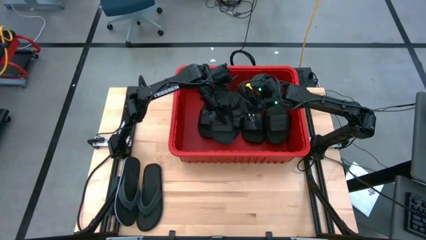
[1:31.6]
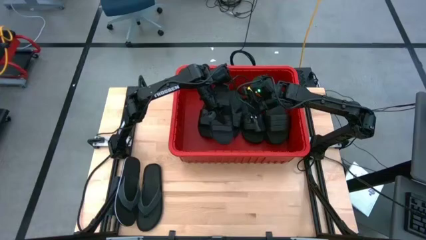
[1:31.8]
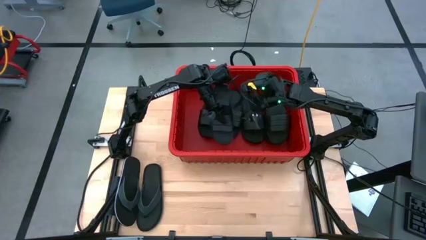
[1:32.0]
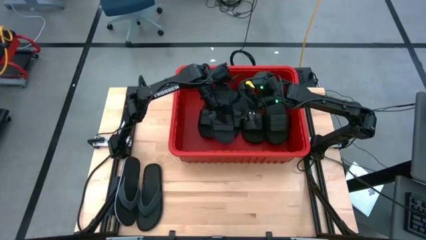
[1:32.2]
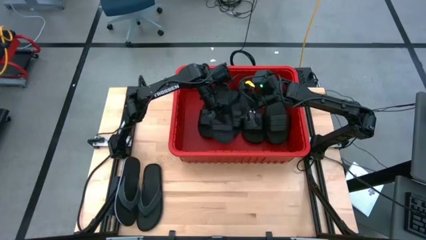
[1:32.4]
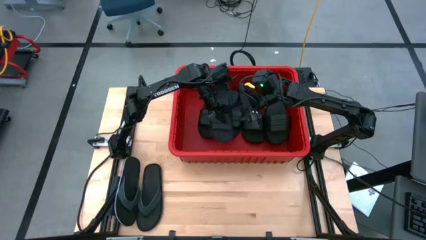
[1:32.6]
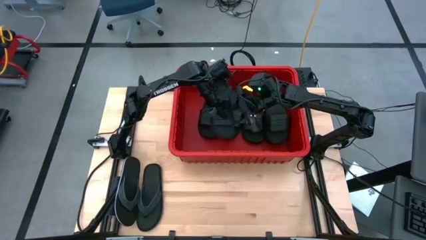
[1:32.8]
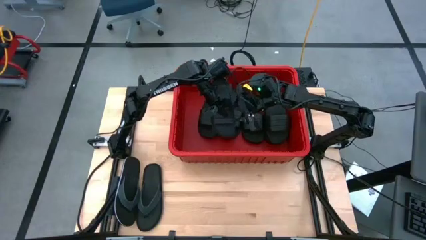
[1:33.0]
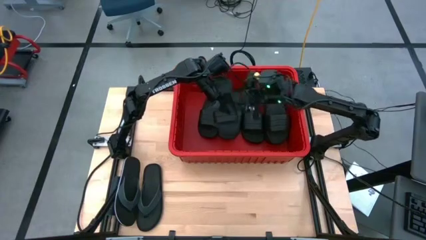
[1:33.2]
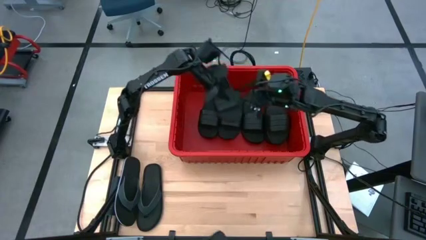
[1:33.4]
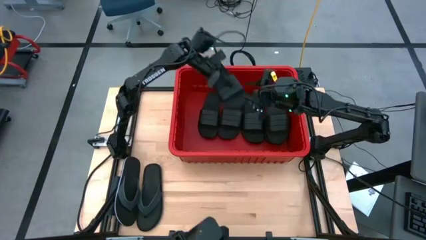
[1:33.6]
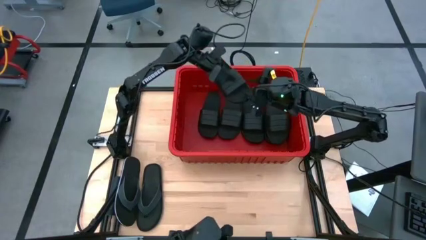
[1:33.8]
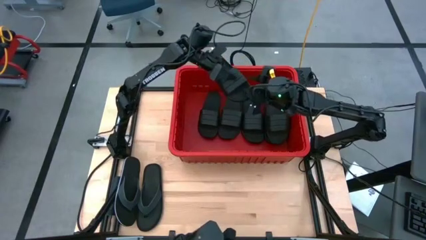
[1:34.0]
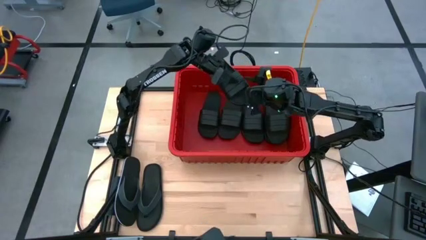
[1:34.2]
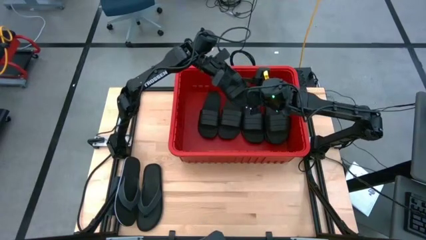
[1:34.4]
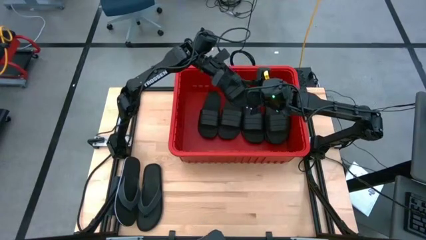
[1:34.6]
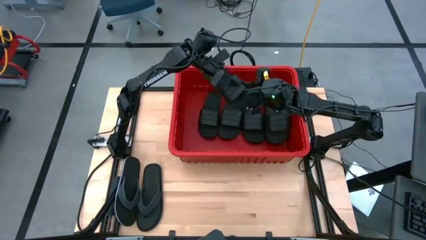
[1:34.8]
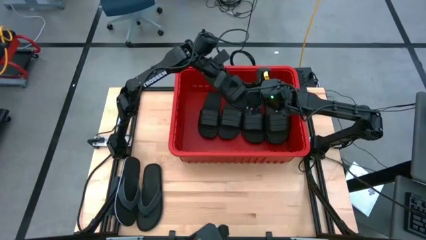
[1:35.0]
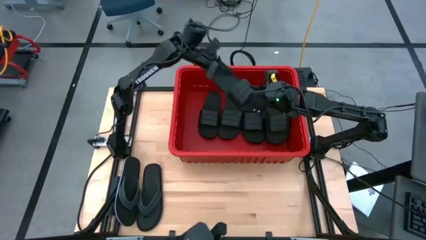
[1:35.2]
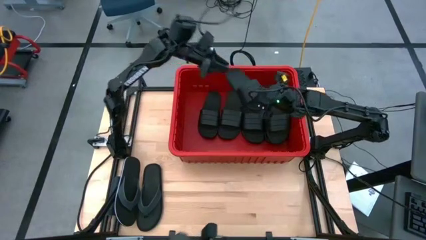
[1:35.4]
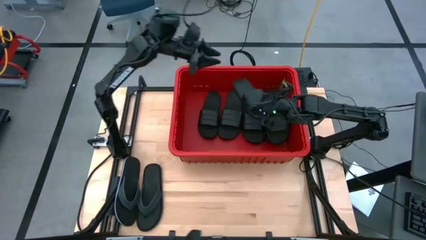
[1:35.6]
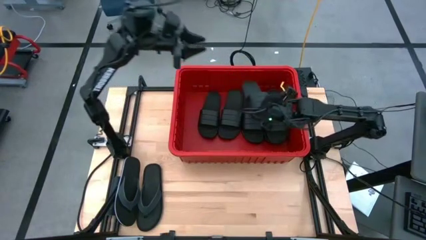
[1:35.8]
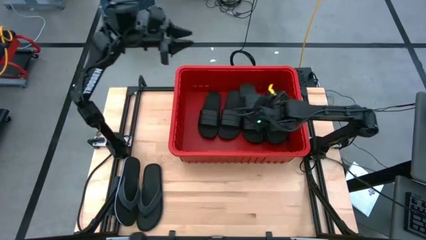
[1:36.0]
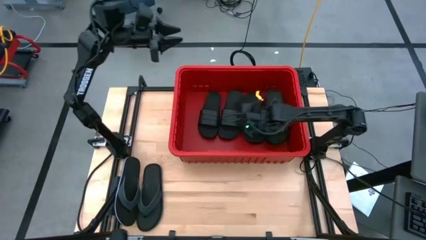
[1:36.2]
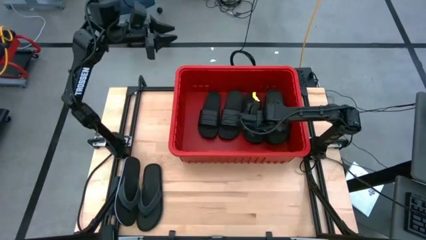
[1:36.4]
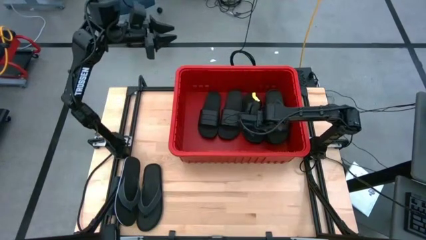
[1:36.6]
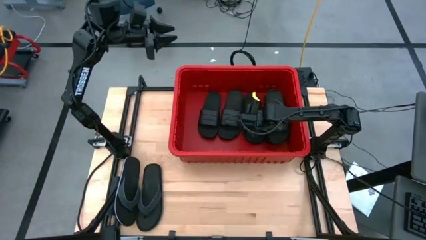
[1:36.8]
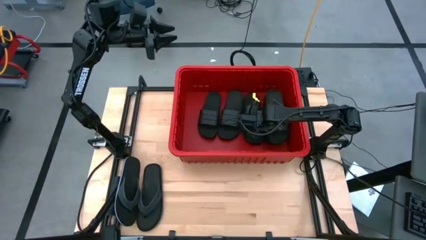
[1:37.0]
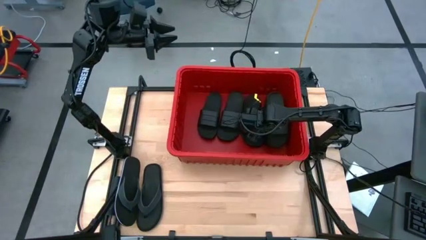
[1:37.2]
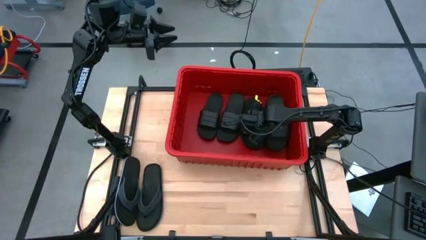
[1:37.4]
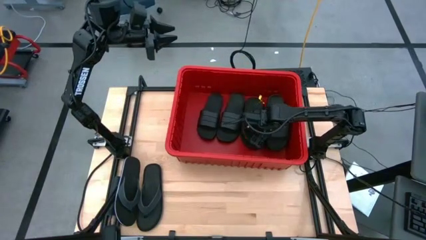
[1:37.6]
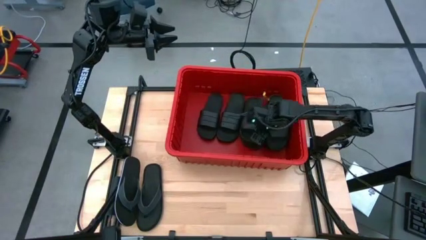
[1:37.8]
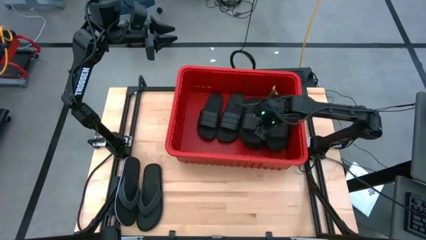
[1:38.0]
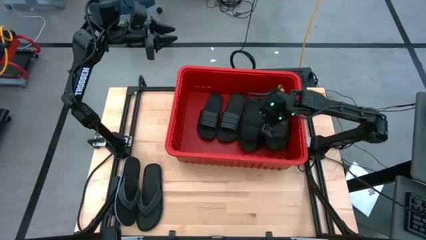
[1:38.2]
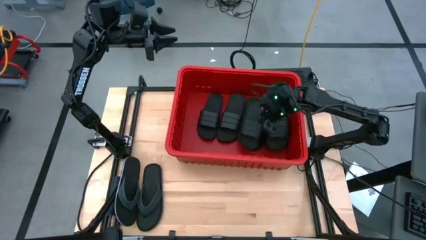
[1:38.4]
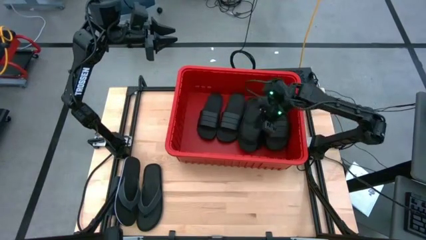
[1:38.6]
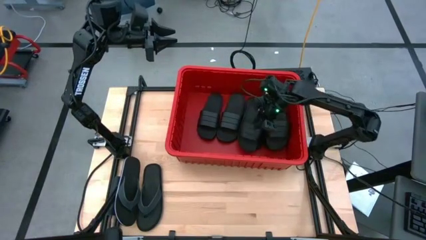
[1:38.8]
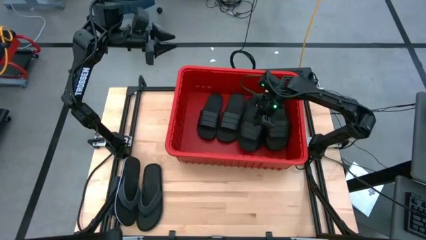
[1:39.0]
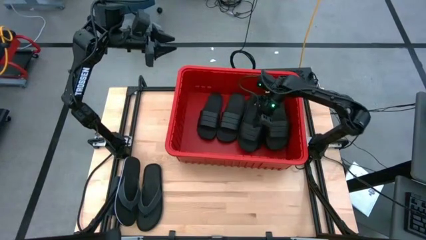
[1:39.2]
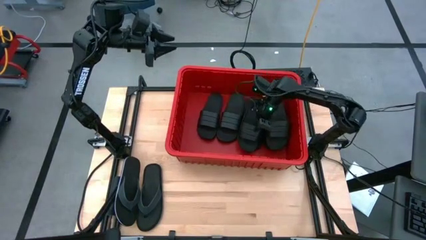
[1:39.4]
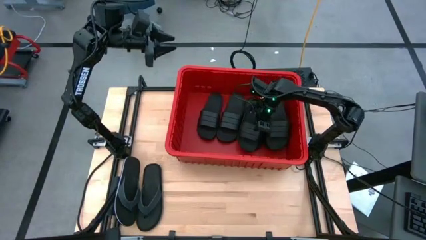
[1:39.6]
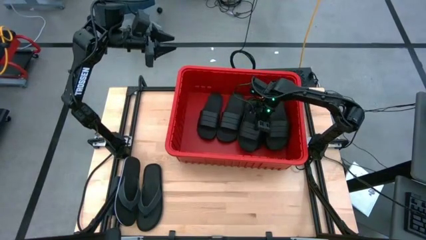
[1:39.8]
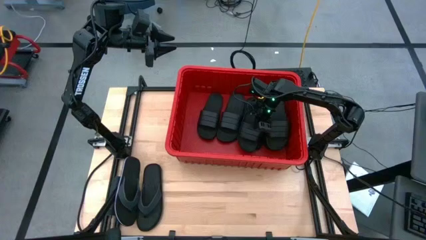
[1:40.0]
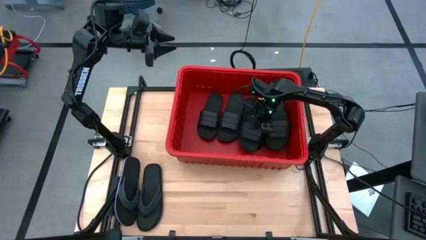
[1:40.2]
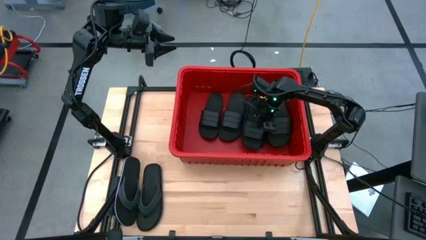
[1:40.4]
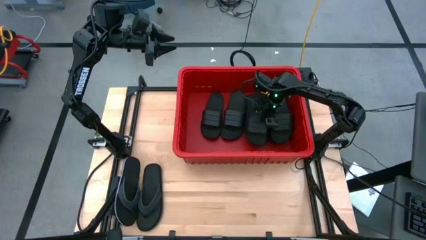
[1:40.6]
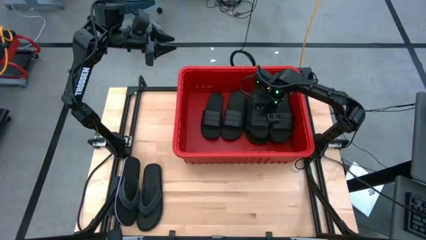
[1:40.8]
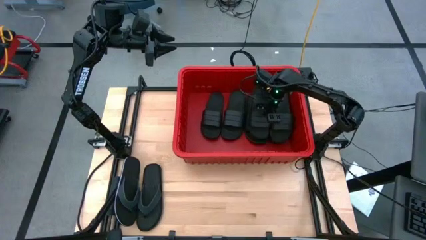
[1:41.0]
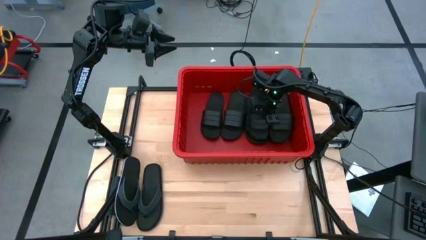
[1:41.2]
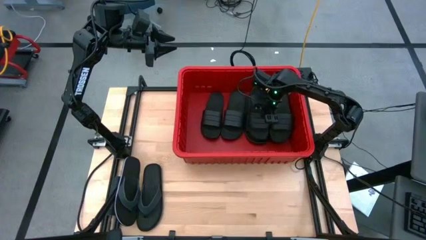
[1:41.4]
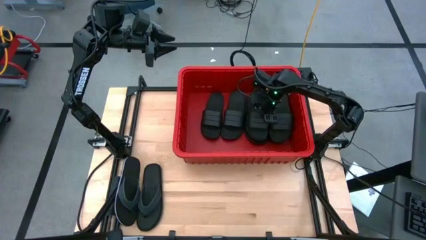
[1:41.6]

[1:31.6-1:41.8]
Task: Pick and place slides into bin
Put the black slide on top of the other black slide into the red bin

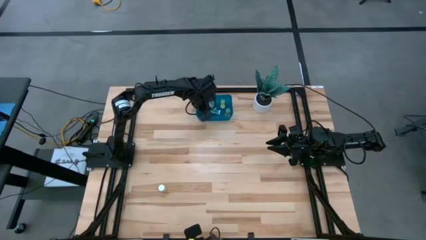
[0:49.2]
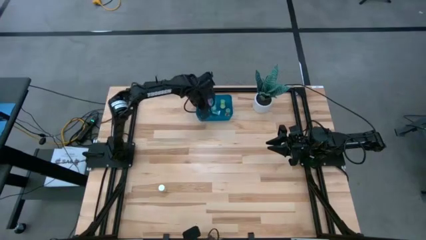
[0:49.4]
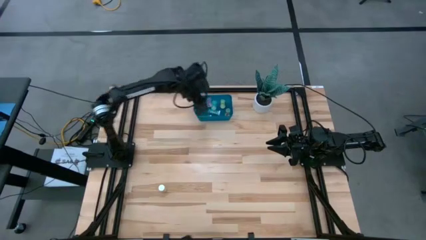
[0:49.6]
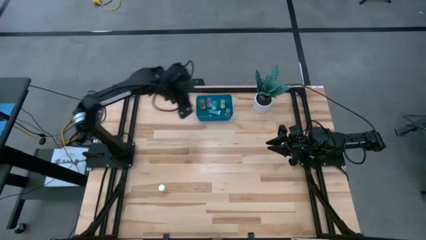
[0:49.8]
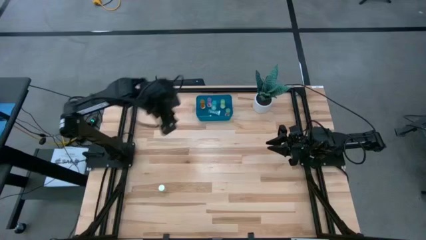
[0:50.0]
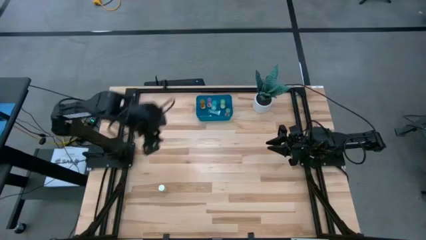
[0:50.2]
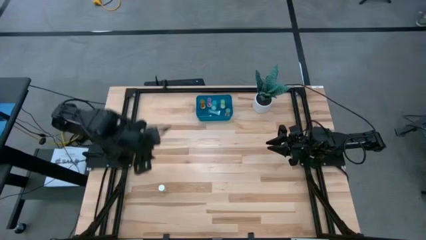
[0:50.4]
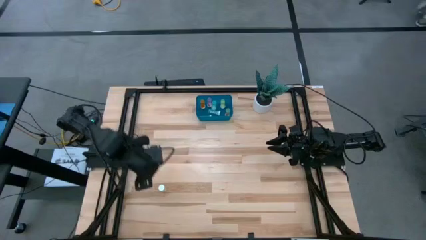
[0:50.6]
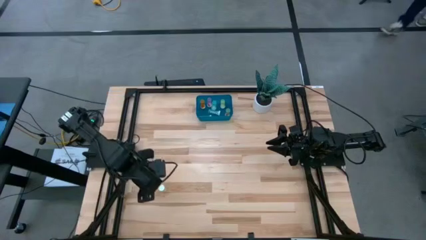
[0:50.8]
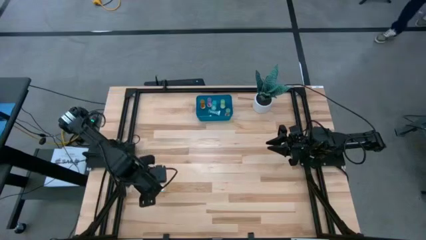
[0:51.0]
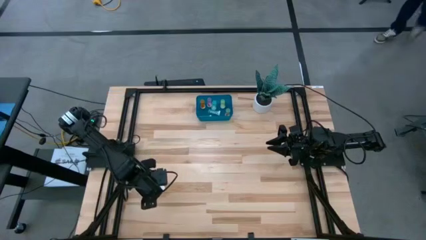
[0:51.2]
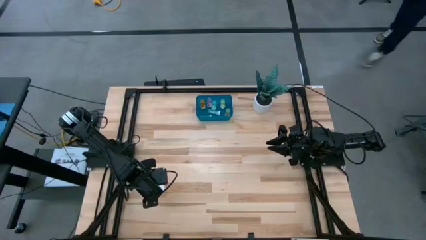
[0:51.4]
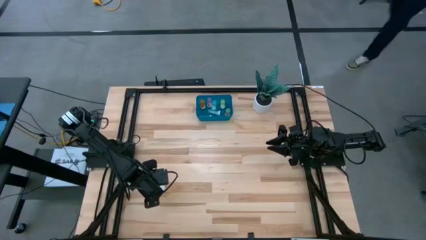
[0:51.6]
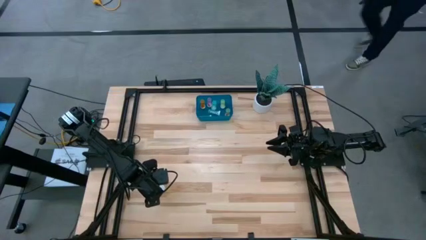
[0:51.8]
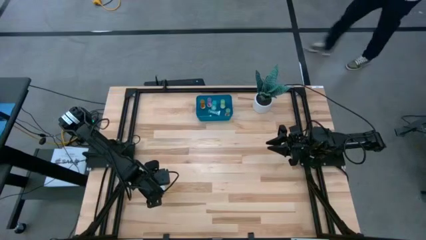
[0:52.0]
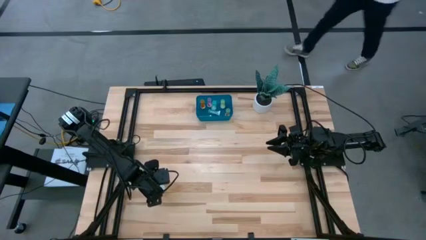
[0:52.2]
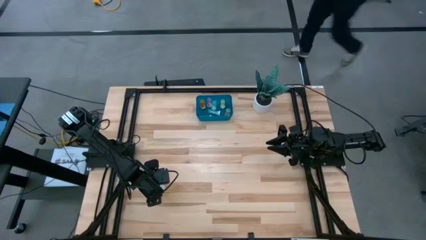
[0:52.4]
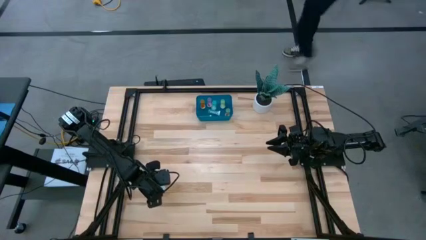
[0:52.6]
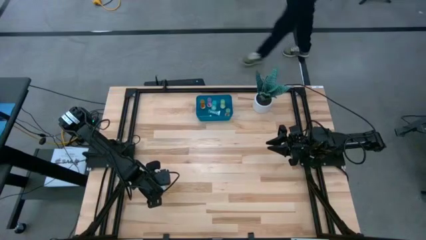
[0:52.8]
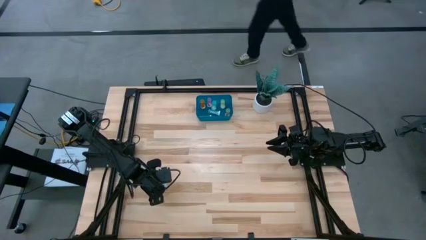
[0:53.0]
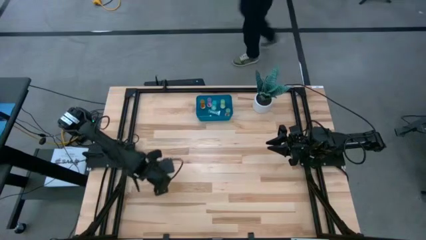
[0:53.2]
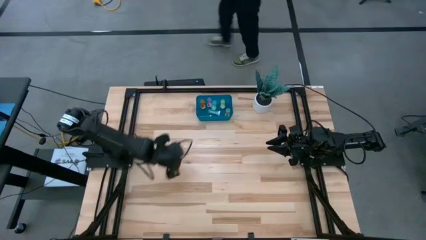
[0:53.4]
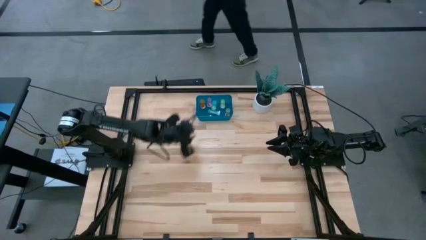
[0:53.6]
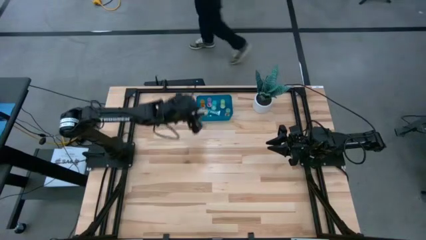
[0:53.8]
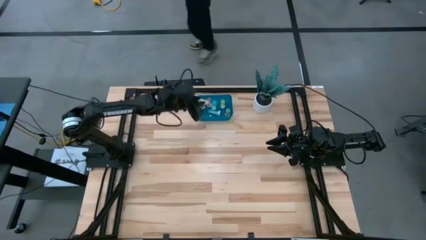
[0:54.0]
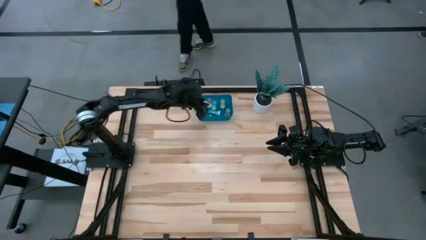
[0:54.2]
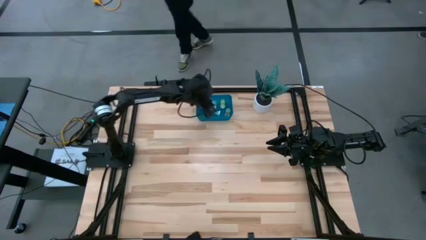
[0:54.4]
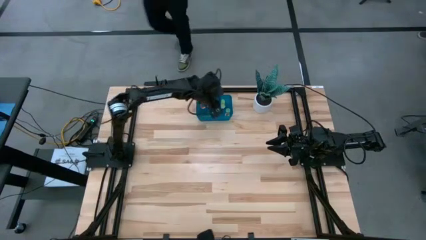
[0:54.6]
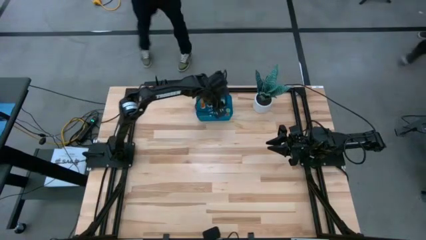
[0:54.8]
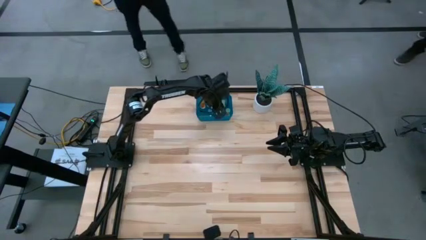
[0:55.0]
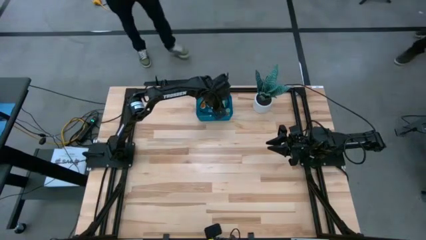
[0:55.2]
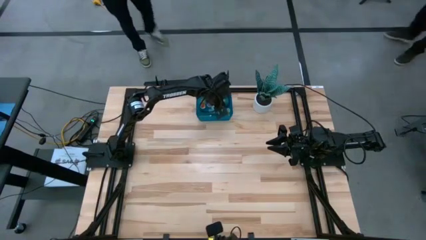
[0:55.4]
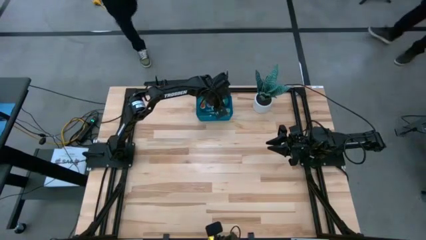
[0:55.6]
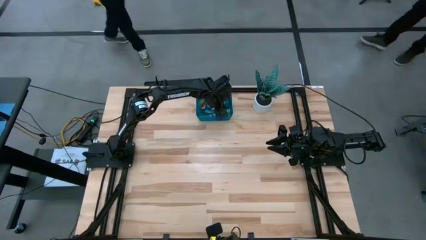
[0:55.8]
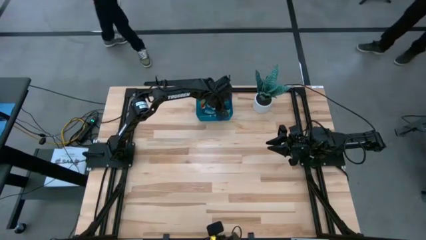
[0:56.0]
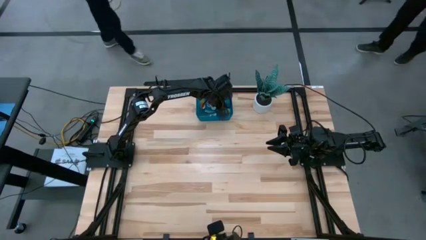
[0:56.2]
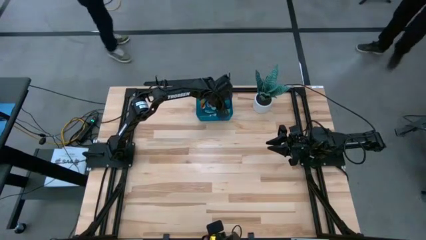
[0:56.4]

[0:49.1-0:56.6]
Task: Pick and place pill bottles into a basket
Put the yellow pill bottle into the blue bin
